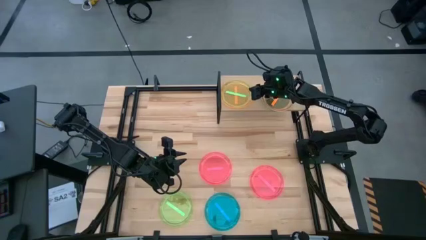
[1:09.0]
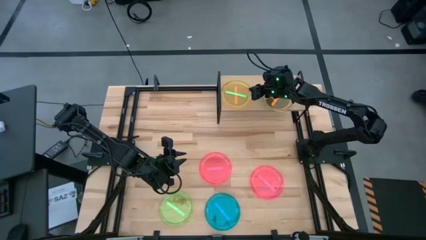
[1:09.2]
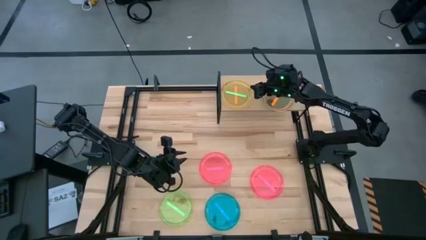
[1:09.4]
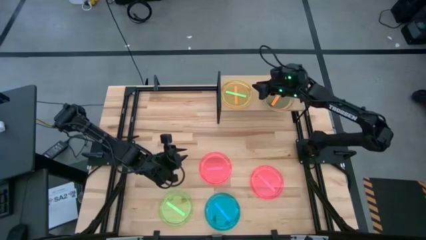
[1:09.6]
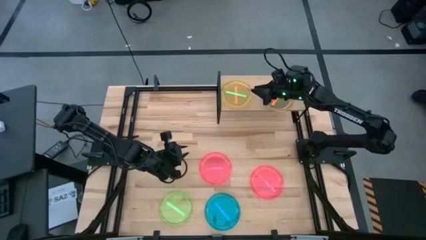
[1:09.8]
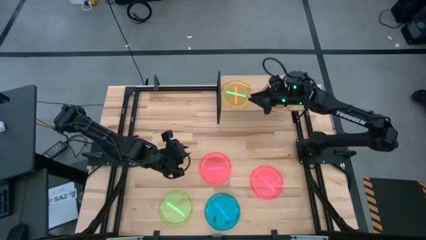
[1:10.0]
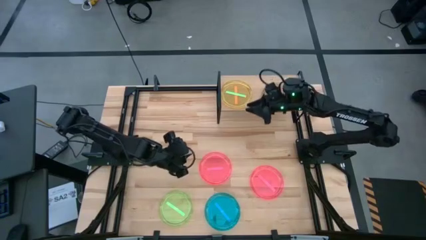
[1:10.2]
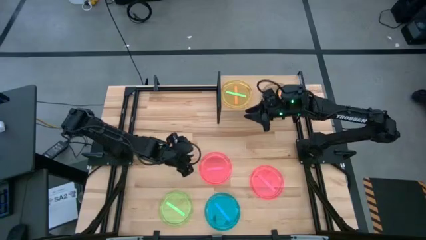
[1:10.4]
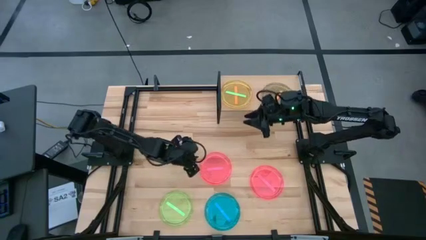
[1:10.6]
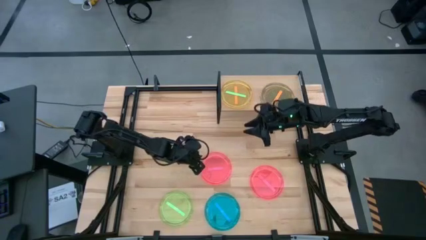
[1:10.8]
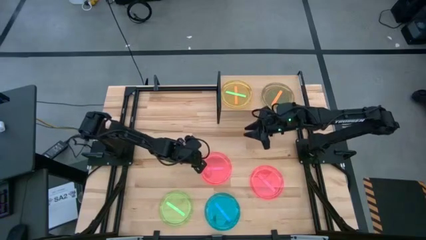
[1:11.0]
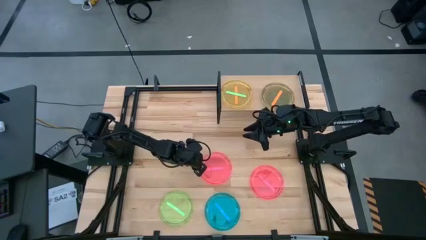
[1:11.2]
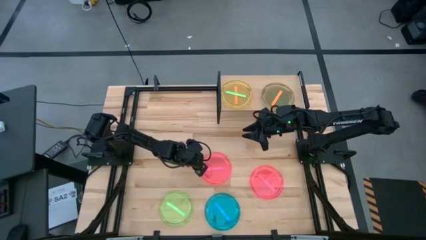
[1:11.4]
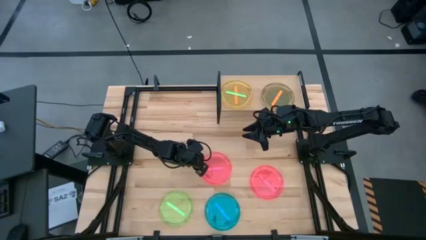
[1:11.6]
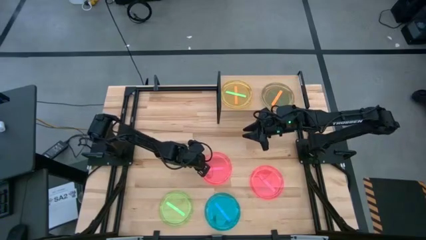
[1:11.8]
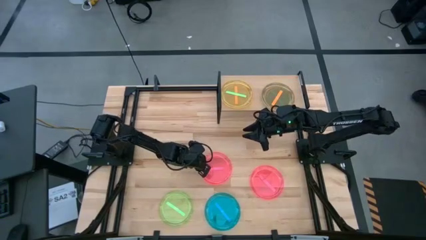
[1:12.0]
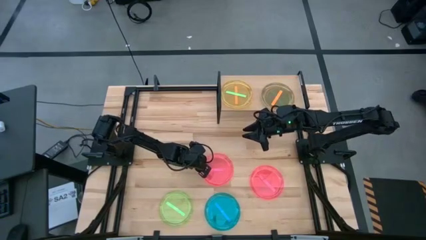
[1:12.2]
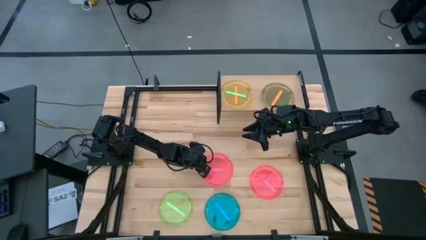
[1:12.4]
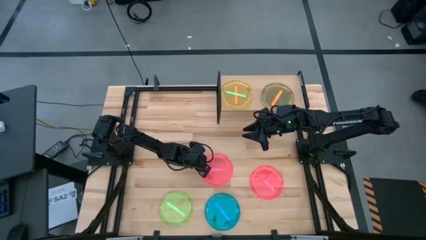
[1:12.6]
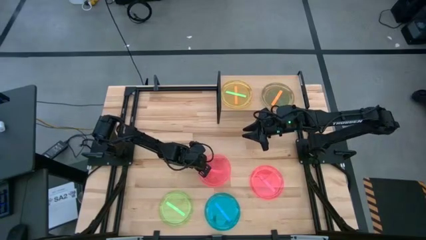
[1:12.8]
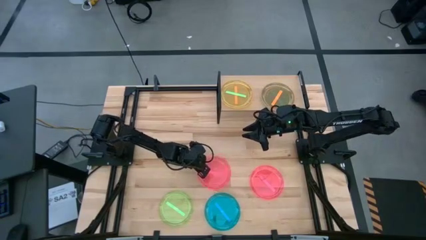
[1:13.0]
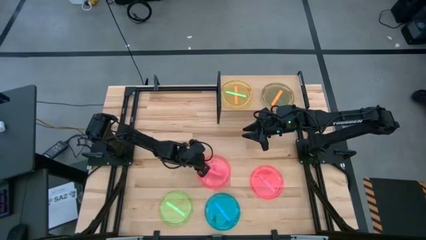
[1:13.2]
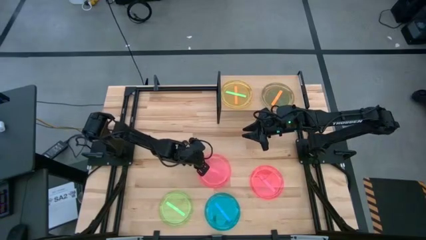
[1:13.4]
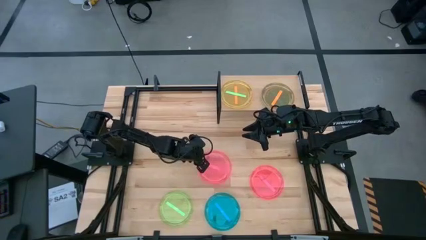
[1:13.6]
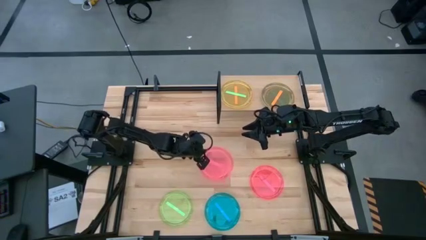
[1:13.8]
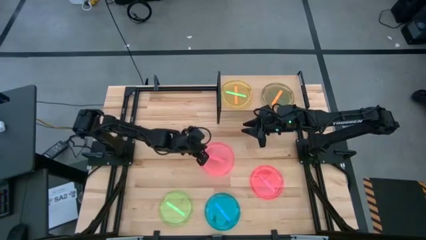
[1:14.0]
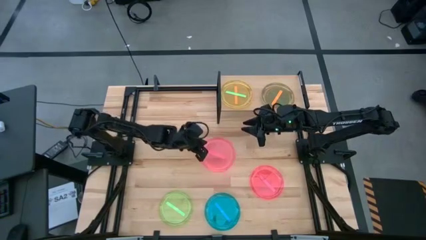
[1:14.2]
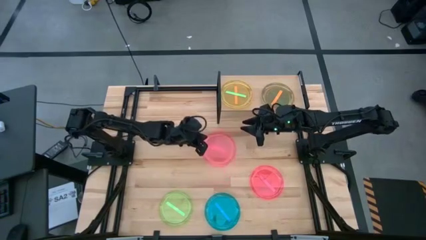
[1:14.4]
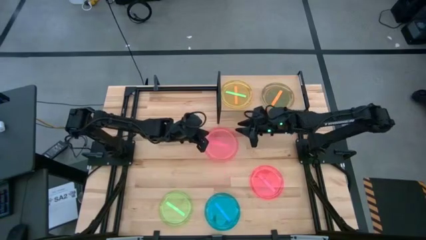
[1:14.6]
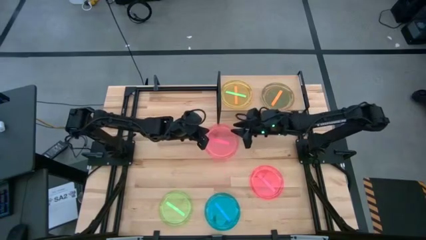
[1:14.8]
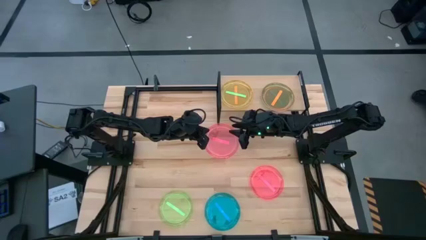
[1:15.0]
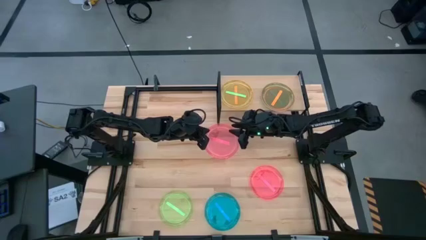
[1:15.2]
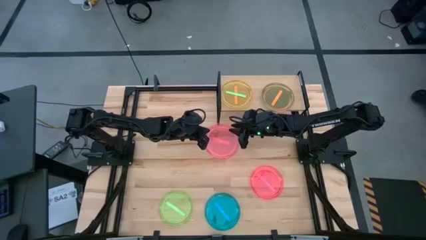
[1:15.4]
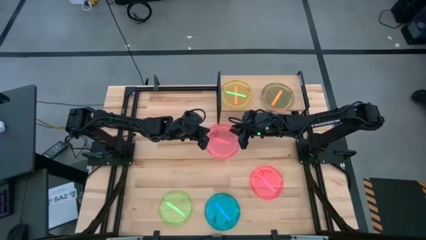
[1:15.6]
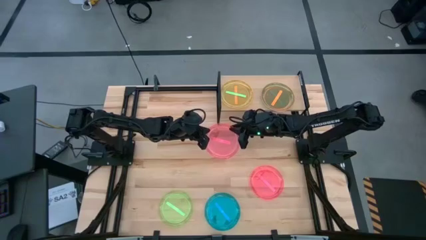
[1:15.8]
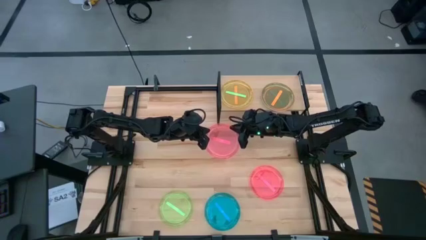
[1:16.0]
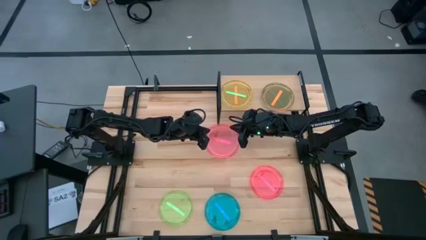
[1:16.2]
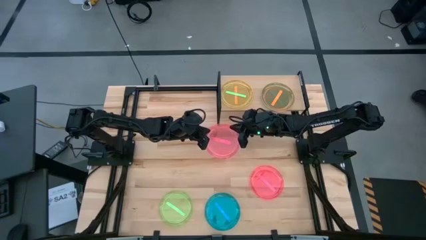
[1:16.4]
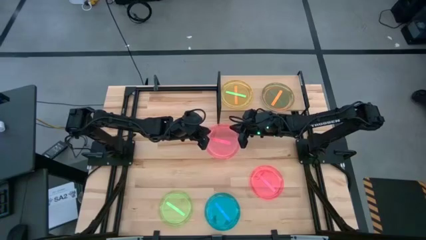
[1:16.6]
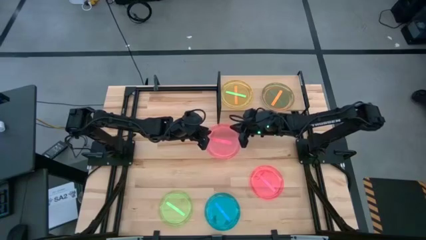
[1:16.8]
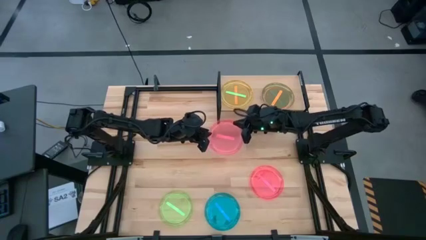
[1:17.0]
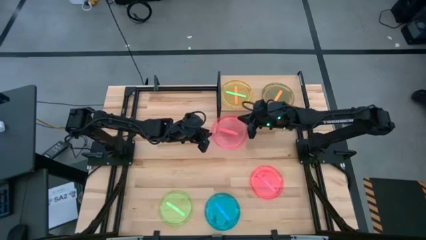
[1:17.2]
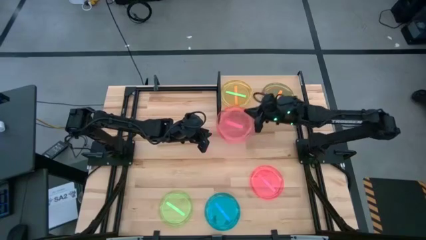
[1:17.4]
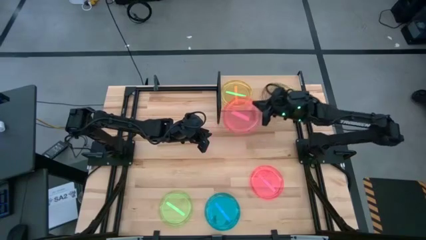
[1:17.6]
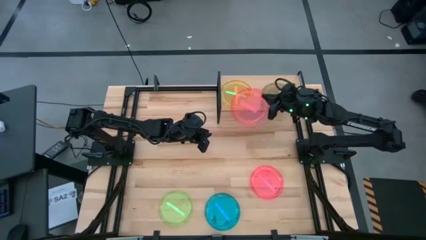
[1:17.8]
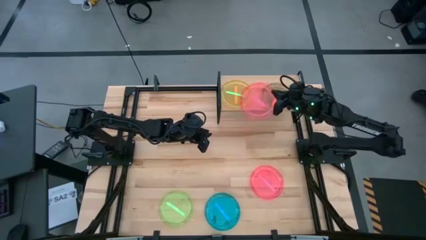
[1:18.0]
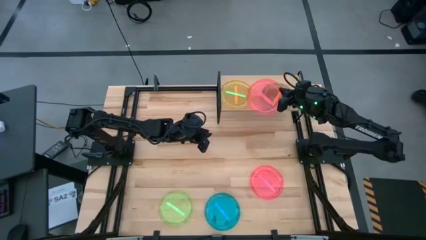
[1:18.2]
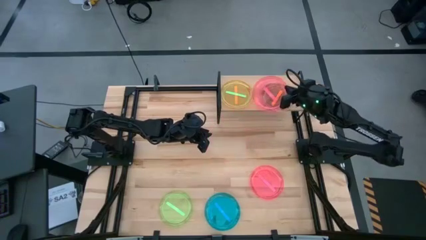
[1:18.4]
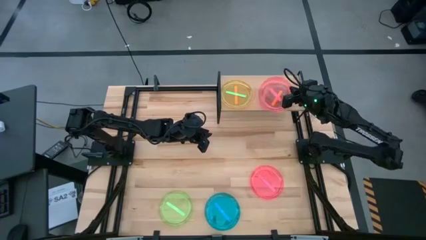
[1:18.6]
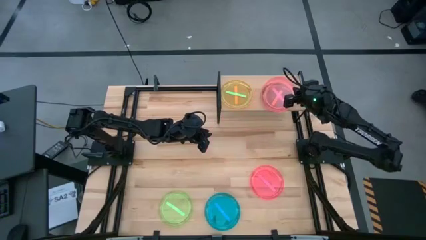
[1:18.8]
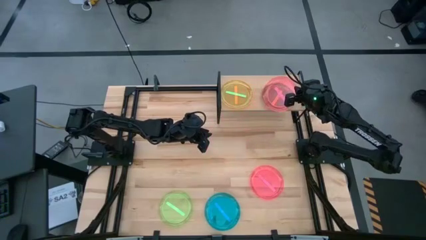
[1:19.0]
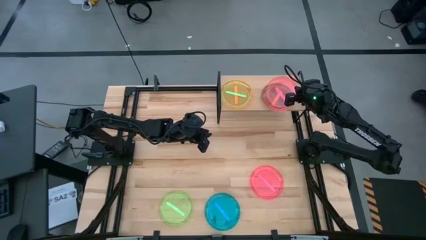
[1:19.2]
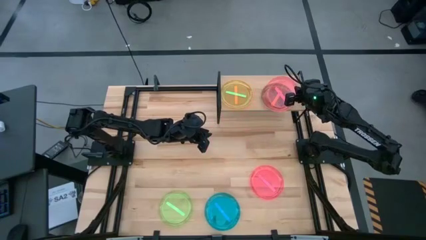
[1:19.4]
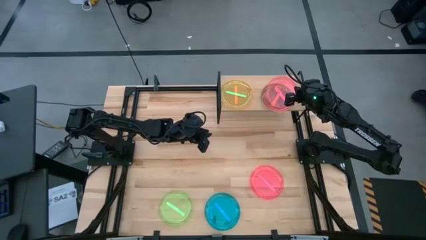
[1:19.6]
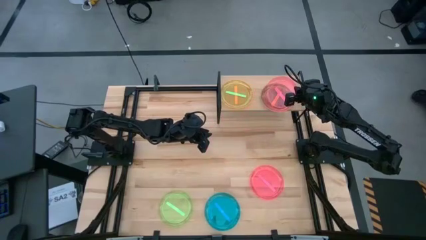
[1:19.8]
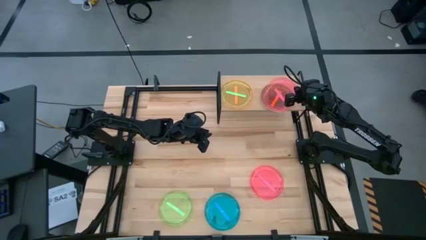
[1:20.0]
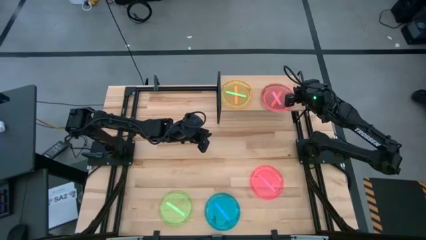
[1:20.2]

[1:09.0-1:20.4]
Task: Place and stack plates onto a shelf
Stack the left pink plate on top of the orange plate on the shelf

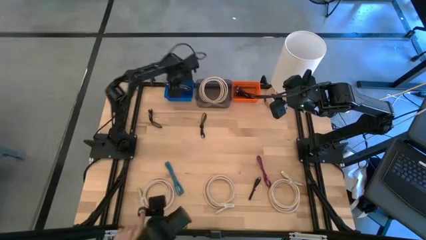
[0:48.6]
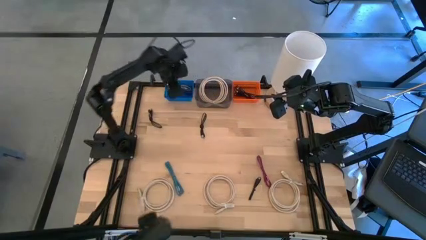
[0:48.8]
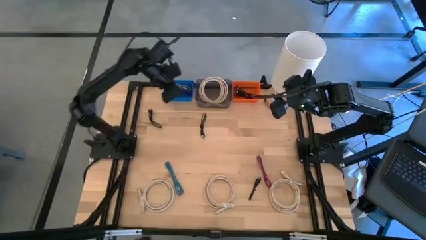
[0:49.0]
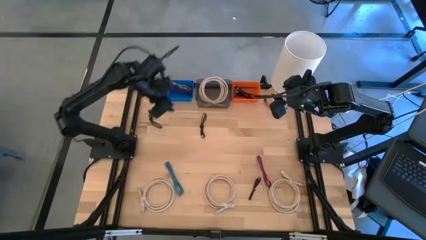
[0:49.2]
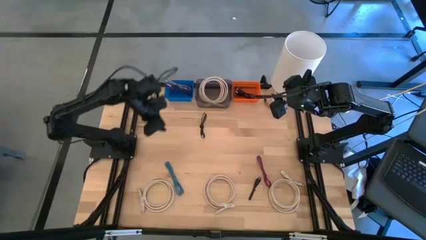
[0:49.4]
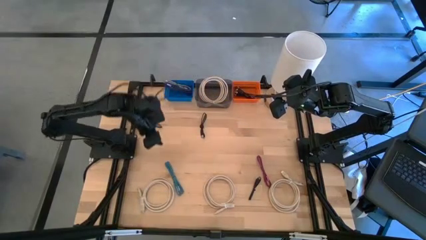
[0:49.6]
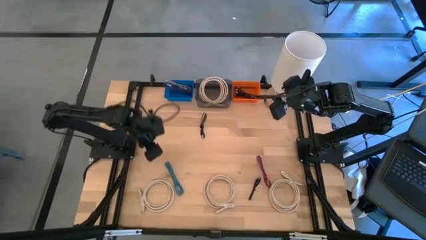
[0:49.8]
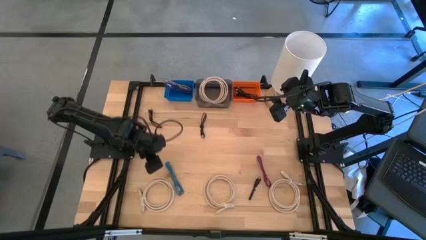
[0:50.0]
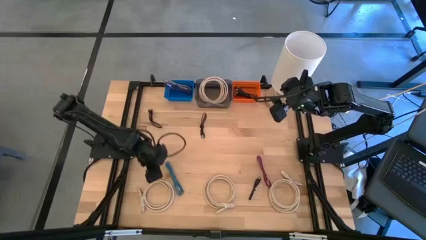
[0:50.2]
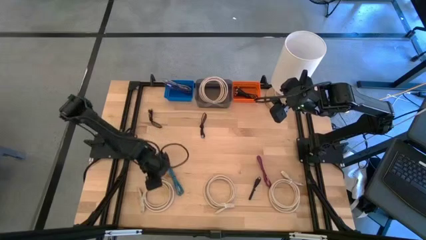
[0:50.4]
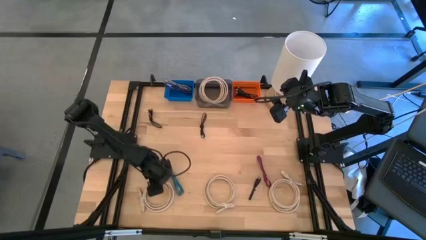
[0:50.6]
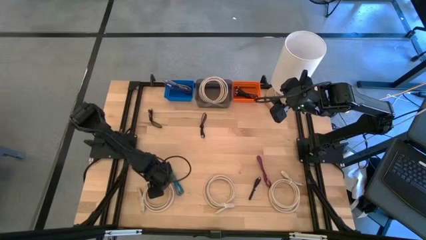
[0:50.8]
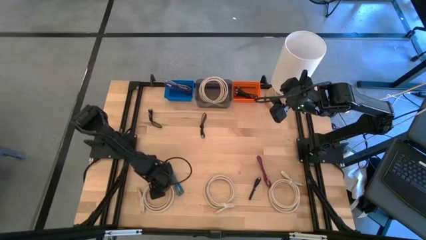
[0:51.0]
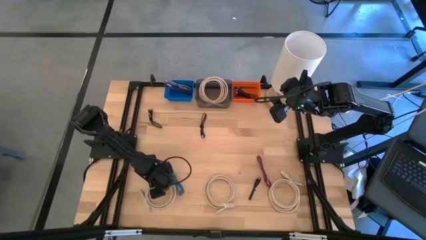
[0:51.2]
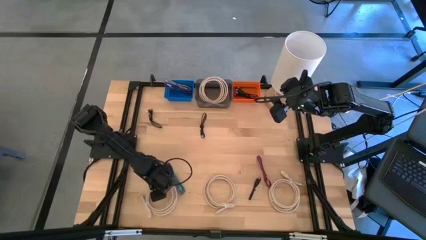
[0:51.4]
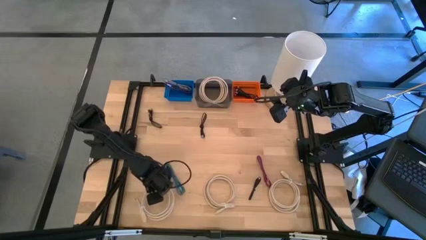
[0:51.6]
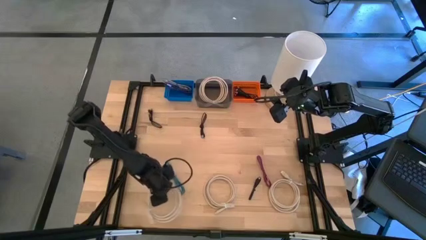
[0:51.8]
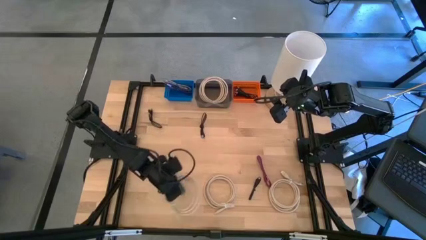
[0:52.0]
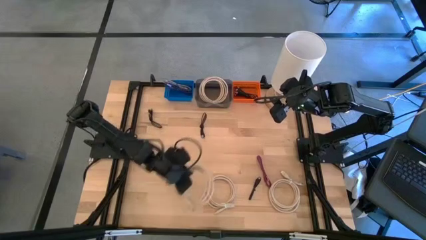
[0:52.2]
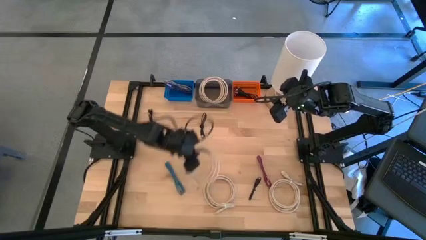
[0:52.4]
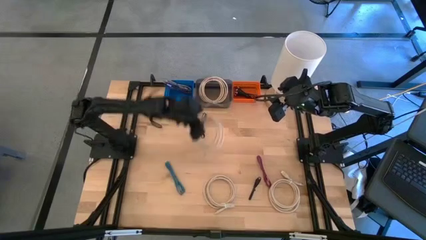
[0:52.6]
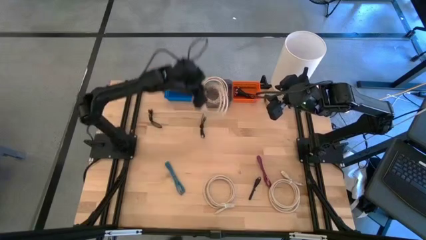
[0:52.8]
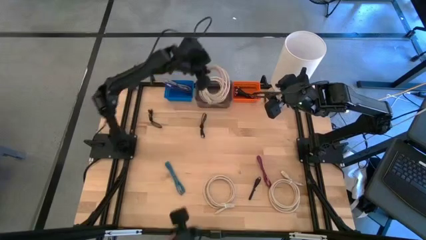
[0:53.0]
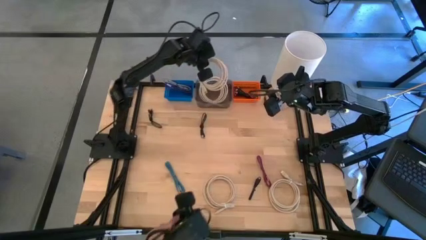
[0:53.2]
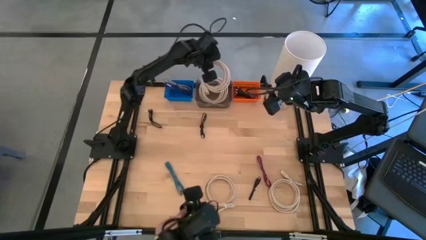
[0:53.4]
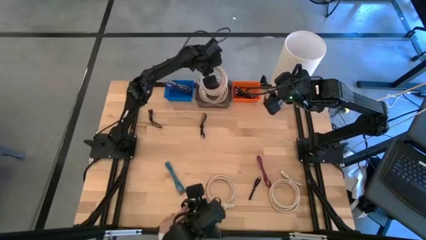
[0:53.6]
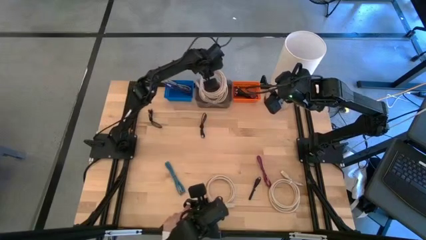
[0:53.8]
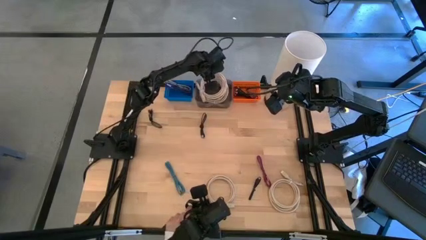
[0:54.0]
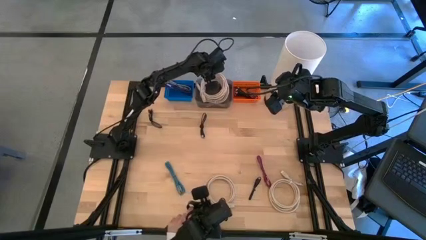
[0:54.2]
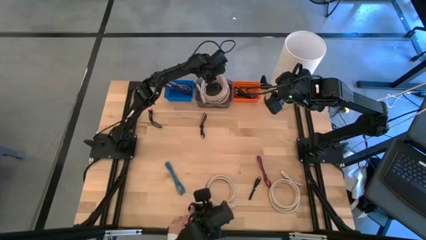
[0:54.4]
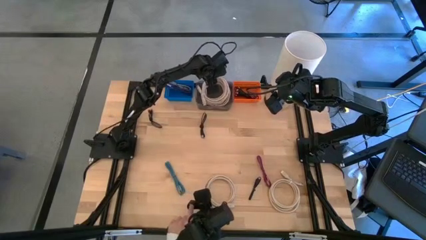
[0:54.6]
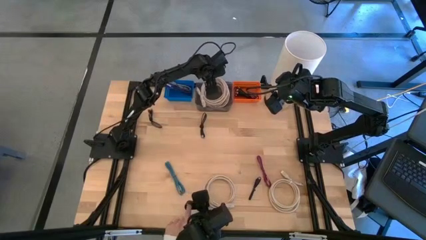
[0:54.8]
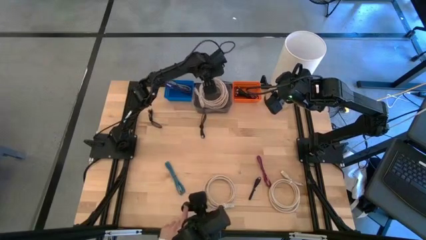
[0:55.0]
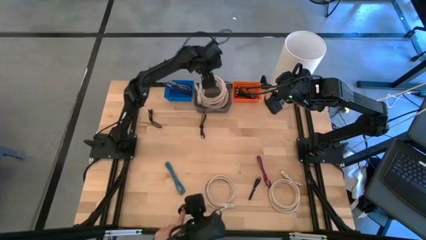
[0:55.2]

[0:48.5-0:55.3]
Task: Pick & Place USB Port
Put the brown HDMI cable into the black bin
